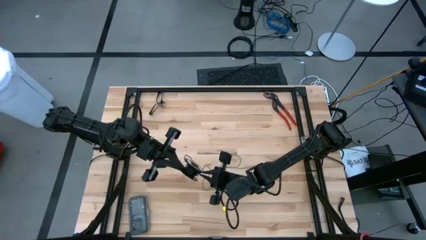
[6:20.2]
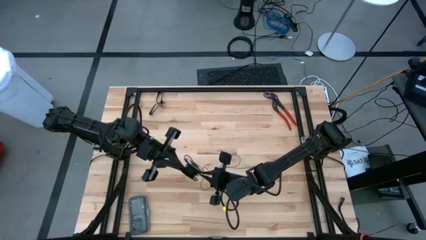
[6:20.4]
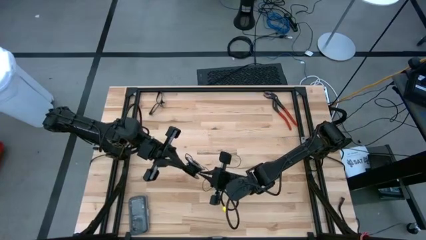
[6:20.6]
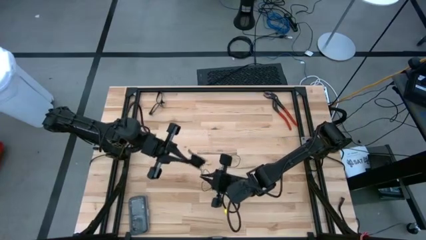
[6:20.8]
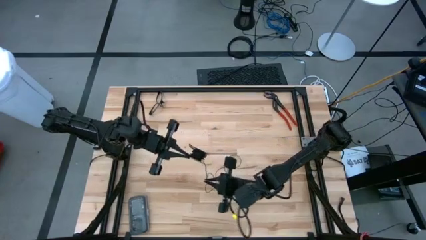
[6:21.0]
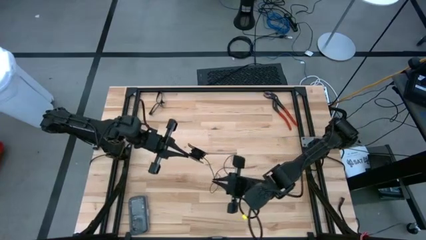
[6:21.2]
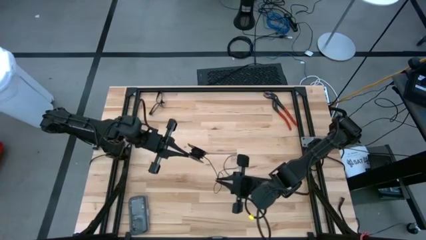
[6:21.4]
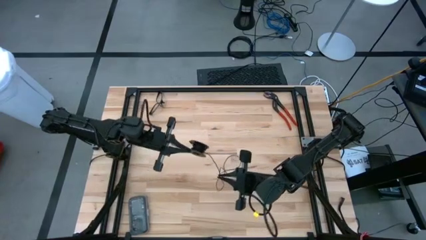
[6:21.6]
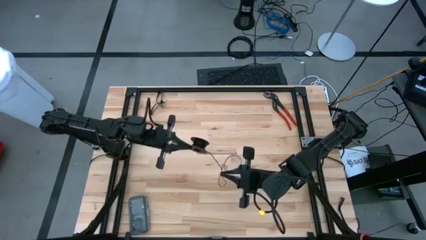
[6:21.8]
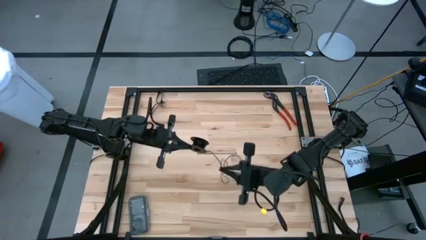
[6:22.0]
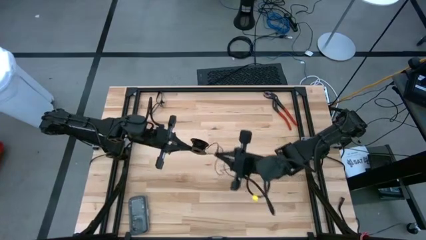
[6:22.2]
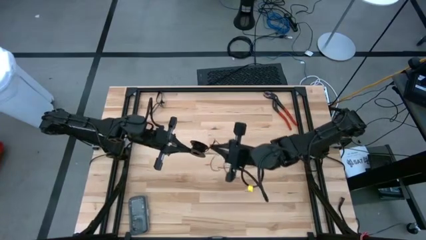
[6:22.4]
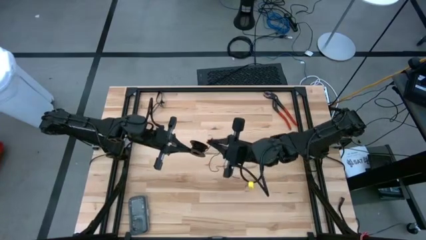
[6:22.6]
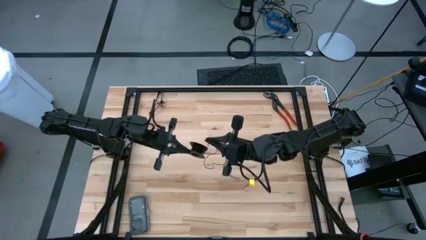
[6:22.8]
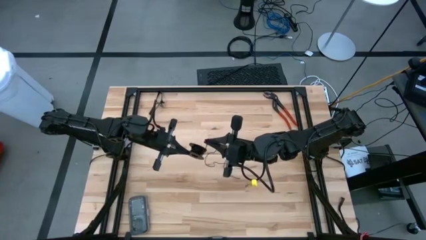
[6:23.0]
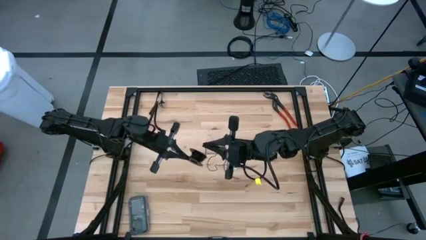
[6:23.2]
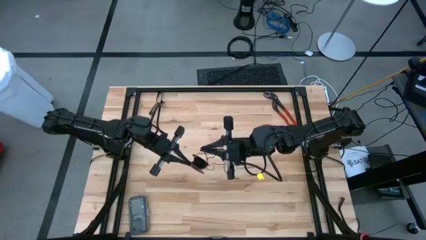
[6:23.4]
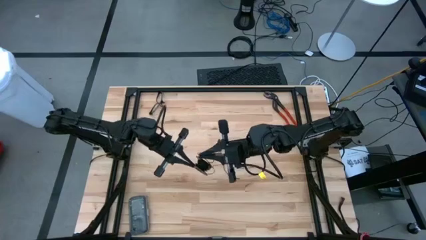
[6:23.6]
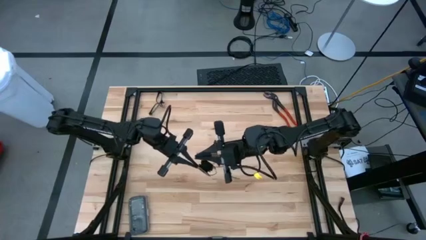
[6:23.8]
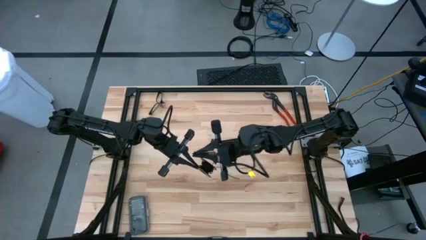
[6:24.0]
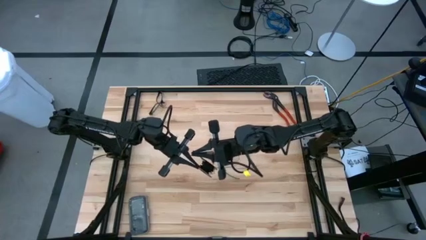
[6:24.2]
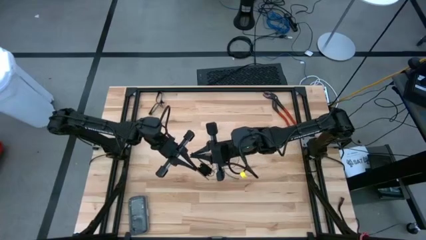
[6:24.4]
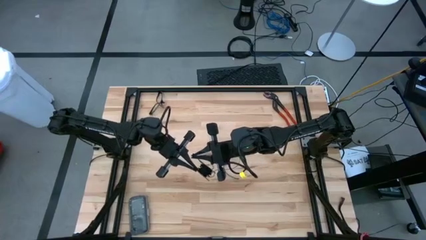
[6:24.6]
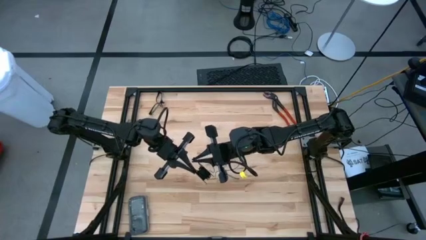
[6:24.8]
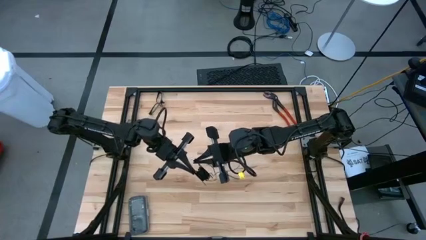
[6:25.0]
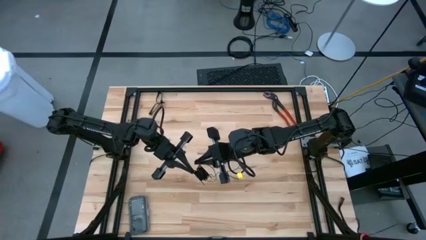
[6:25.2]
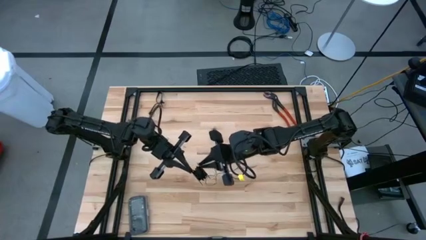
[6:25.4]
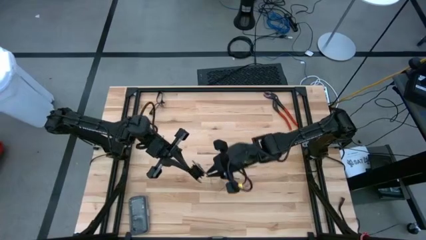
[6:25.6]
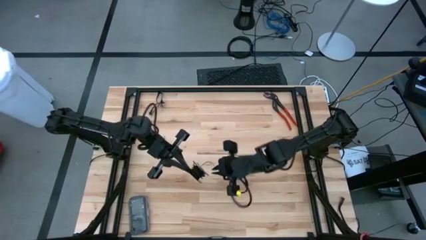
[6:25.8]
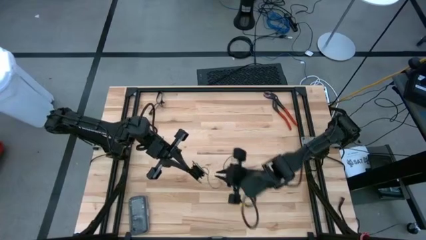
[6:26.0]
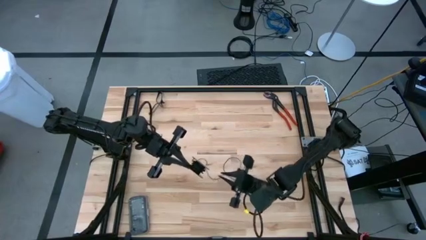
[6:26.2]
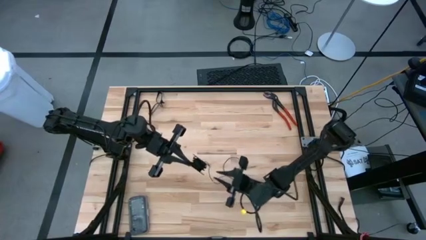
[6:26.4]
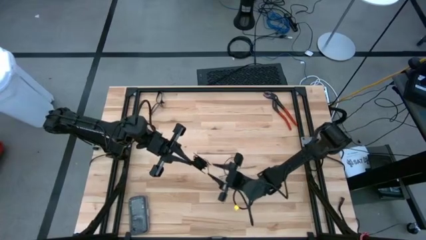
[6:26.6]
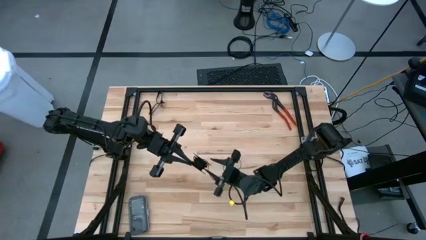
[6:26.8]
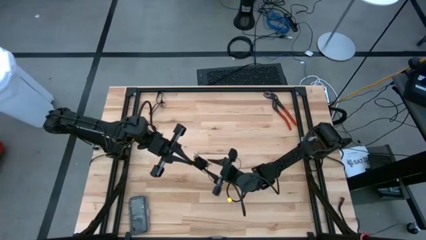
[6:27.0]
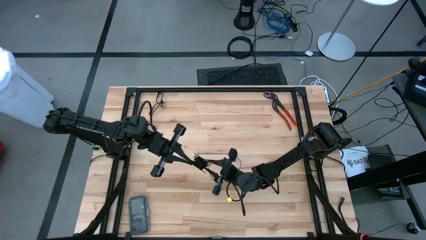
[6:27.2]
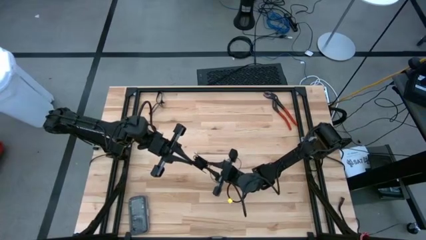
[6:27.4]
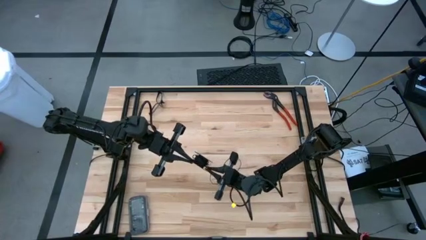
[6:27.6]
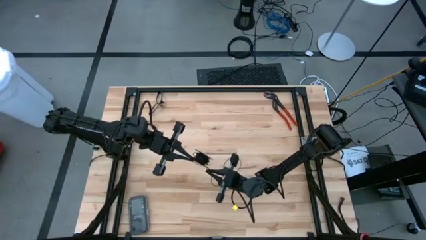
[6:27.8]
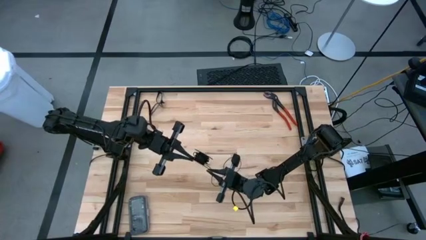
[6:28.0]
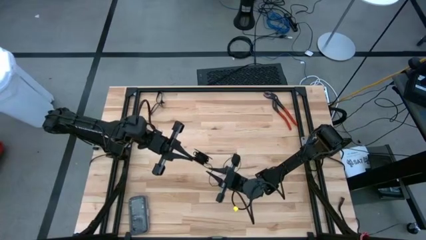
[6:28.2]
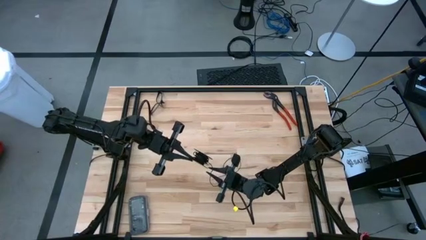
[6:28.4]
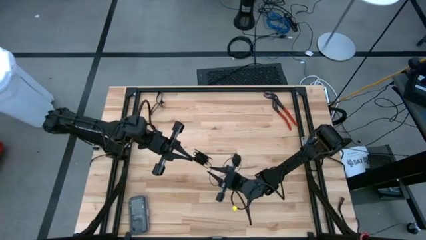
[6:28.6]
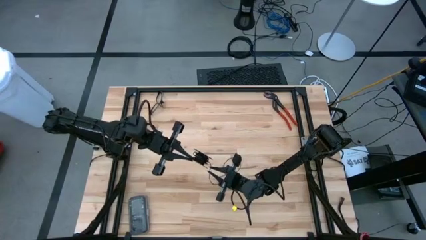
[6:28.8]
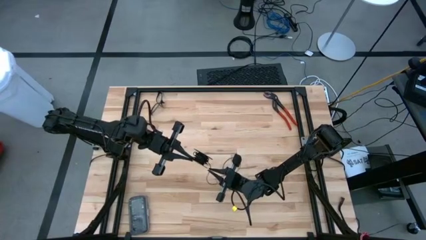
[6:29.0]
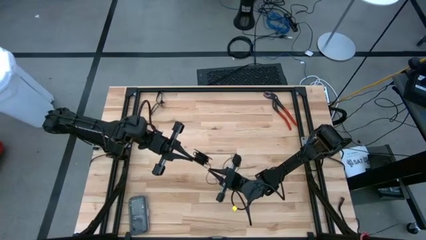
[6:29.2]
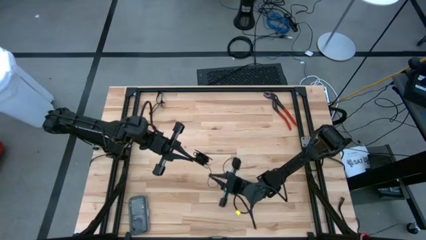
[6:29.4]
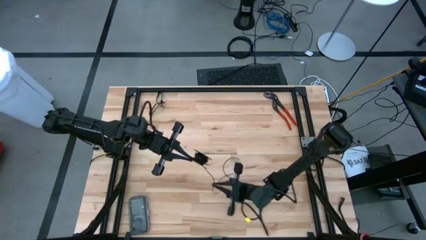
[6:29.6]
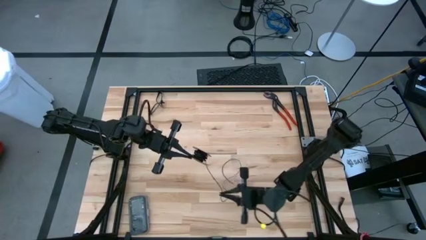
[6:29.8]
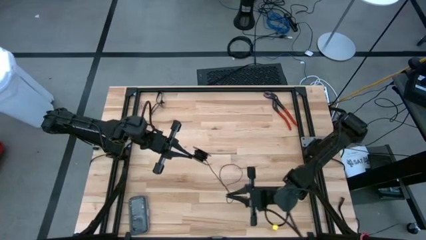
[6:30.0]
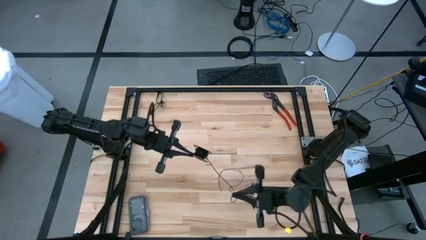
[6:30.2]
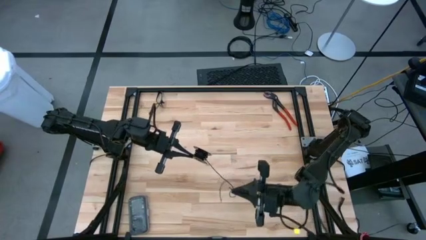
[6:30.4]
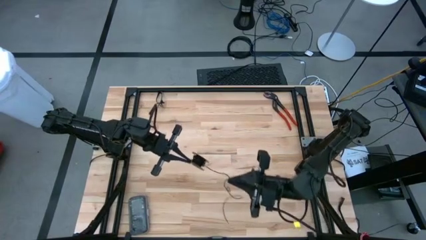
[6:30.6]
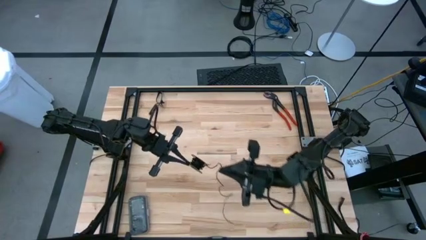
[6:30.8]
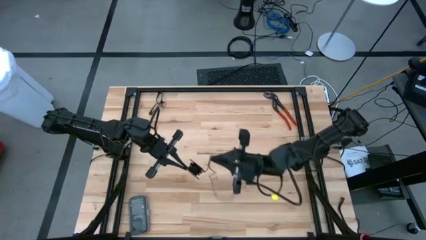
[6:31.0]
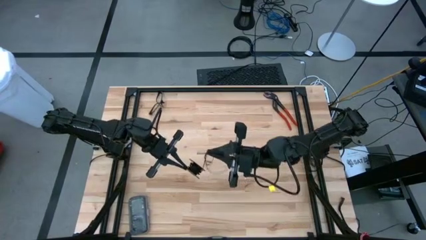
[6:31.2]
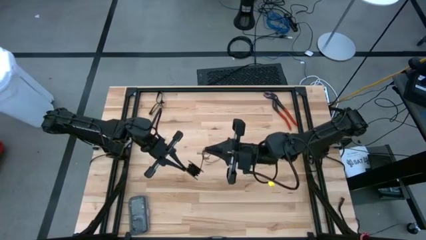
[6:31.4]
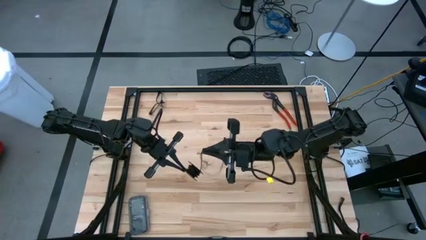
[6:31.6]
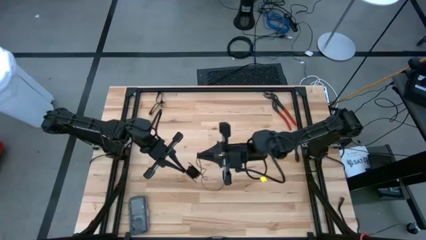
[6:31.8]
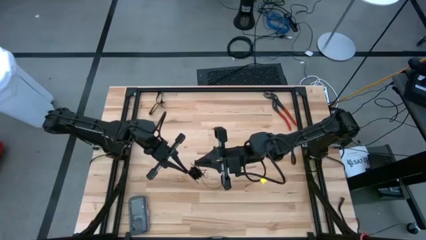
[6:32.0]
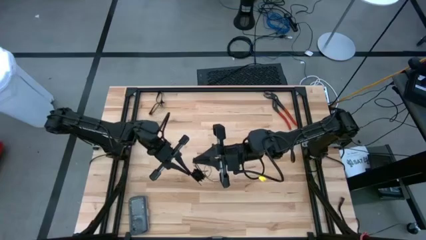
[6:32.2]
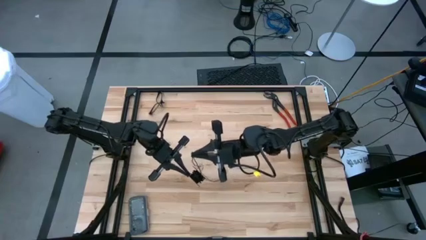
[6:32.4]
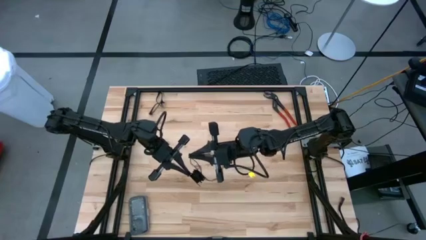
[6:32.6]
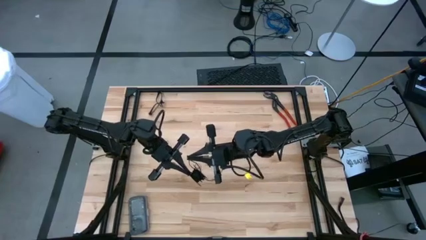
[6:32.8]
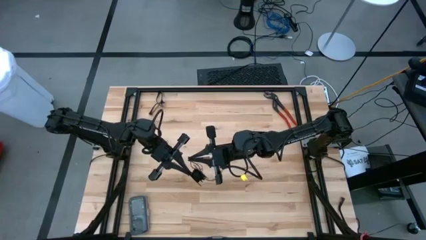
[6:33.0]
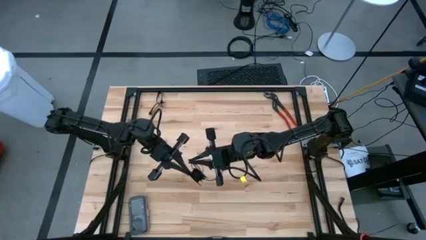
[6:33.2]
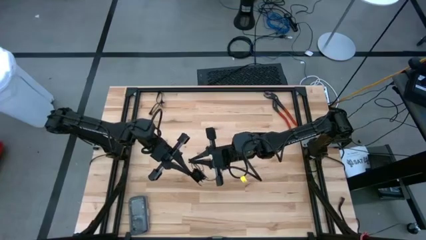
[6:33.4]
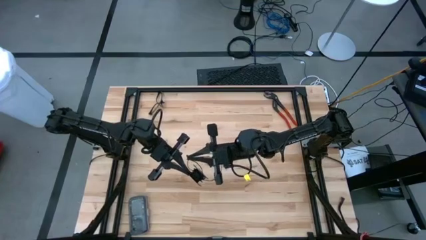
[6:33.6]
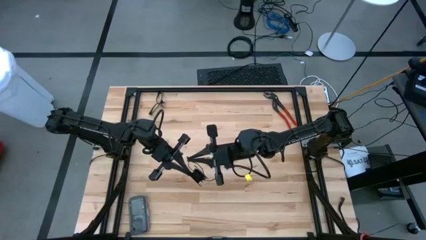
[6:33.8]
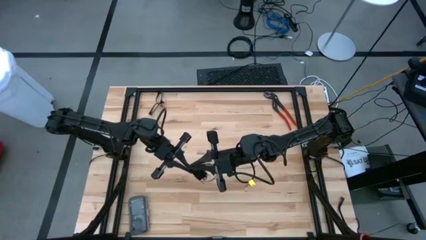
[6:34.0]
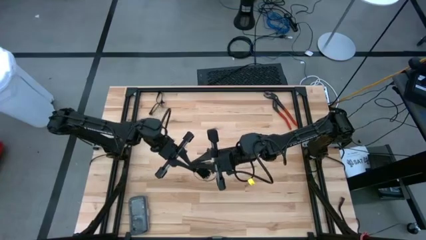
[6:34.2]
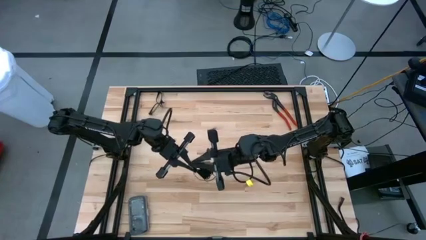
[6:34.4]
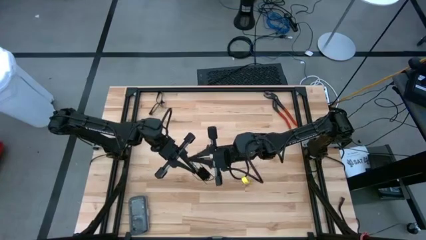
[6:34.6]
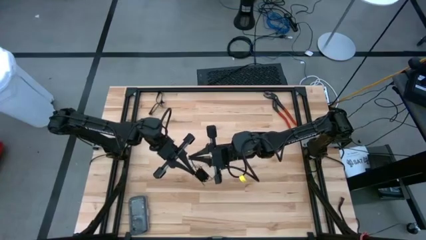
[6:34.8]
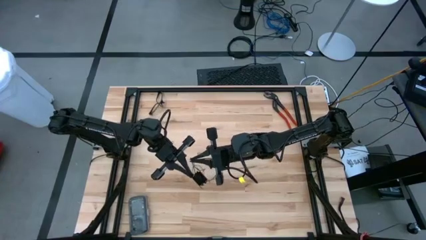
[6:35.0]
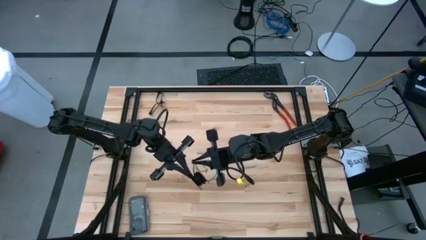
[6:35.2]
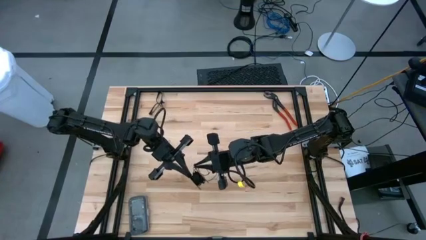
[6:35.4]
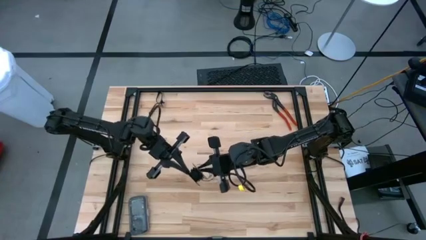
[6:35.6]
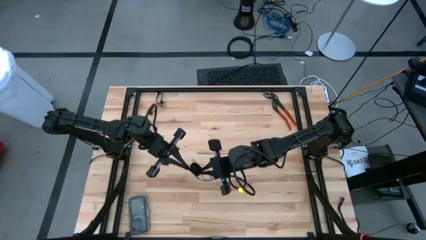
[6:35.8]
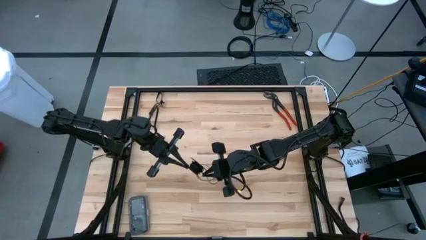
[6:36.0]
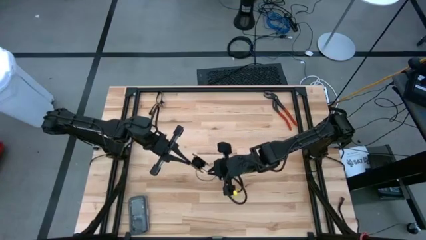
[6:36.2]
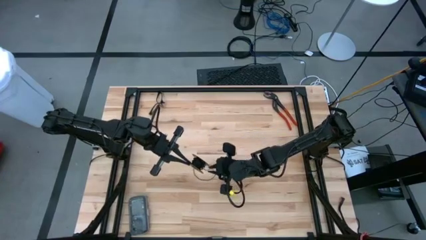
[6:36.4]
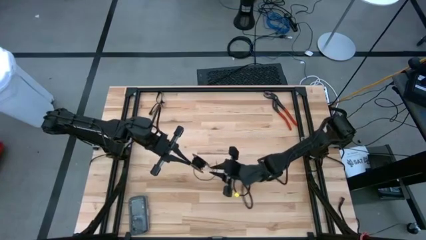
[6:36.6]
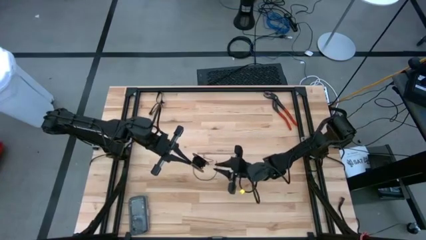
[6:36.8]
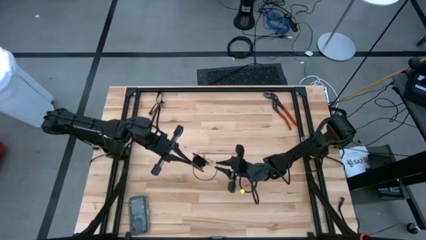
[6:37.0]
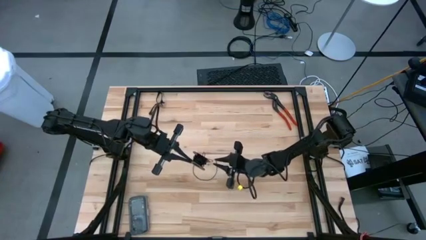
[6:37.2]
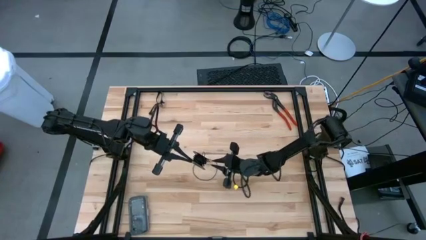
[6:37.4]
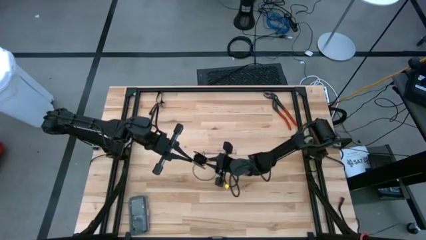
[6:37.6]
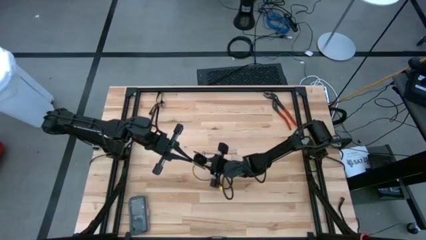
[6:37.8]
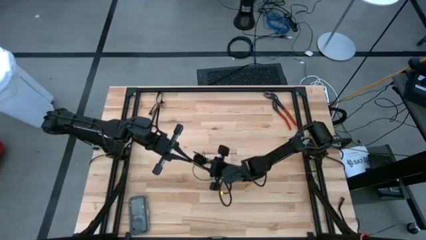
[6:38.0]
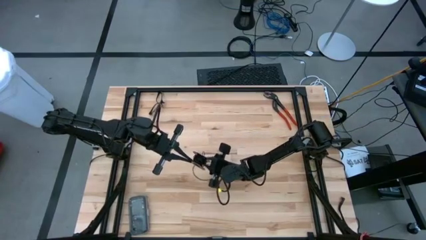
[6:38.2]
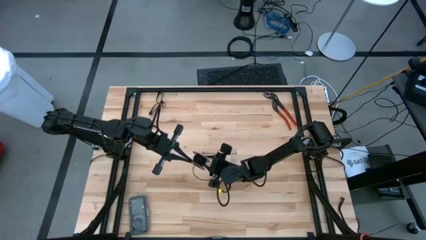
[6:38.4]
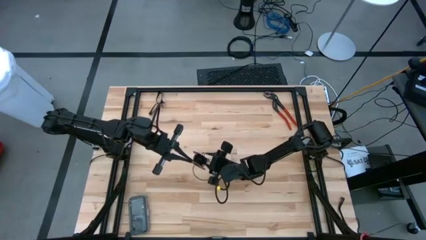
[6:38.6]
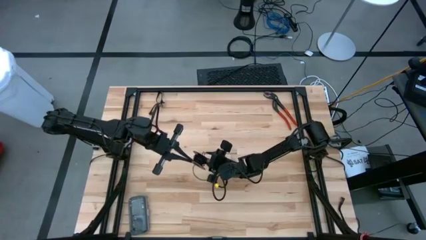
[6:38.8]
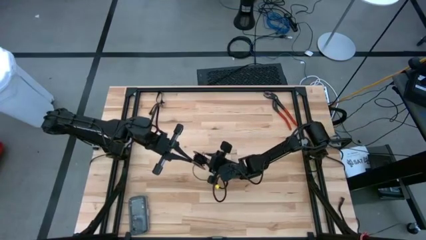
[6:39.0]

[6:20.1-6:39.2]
Task: Coil cords
Coil the black wire onto the spool
